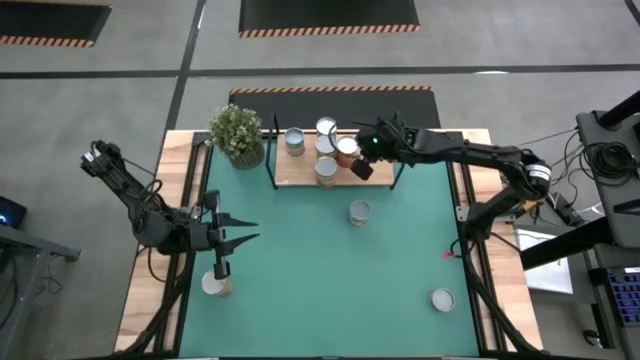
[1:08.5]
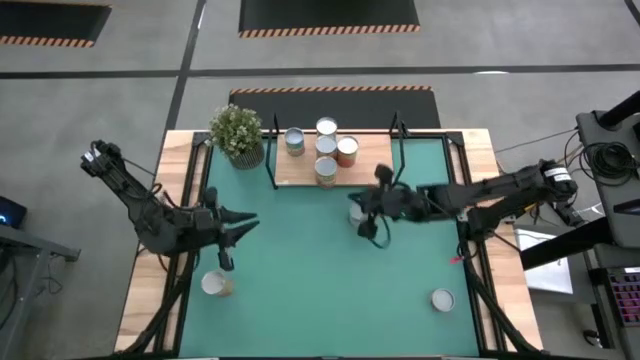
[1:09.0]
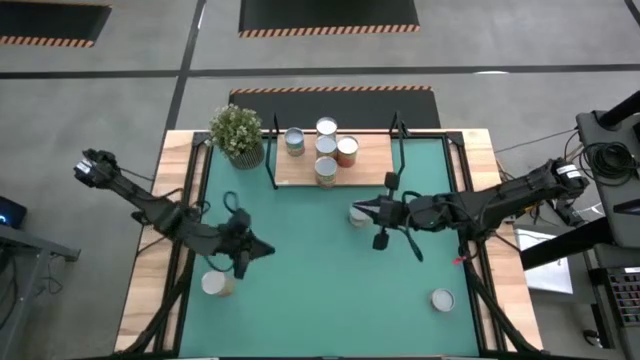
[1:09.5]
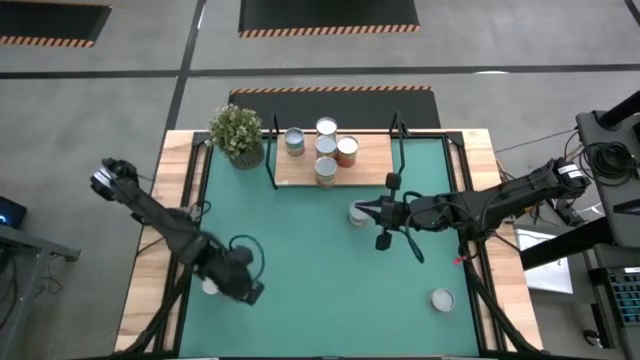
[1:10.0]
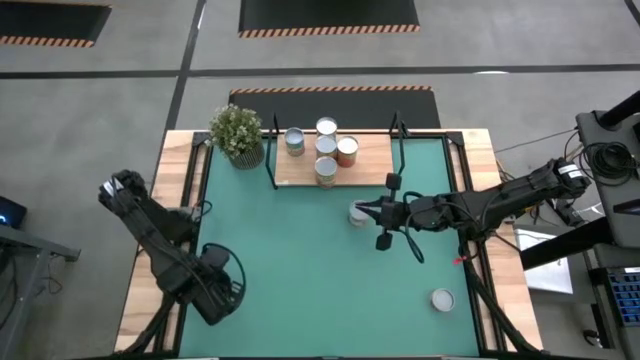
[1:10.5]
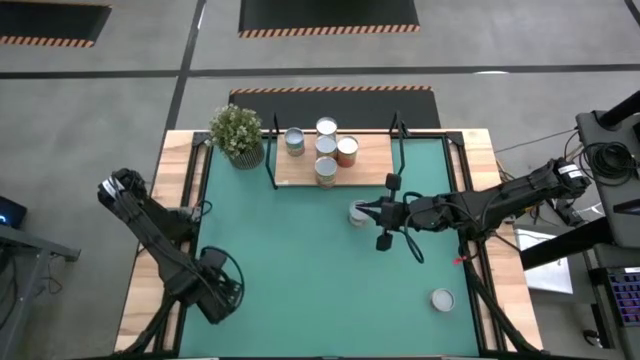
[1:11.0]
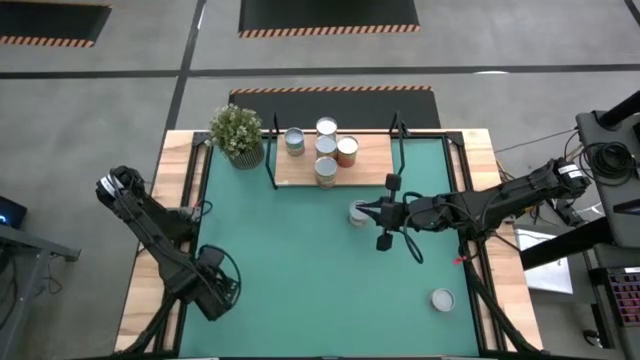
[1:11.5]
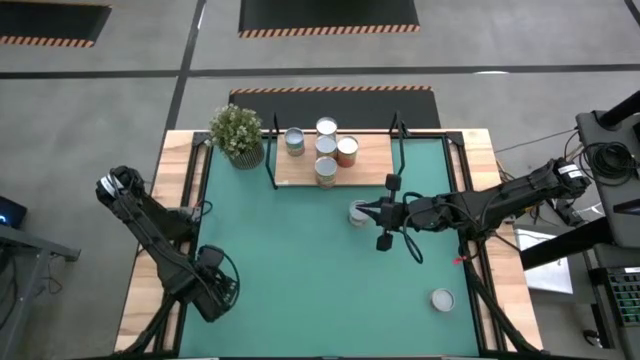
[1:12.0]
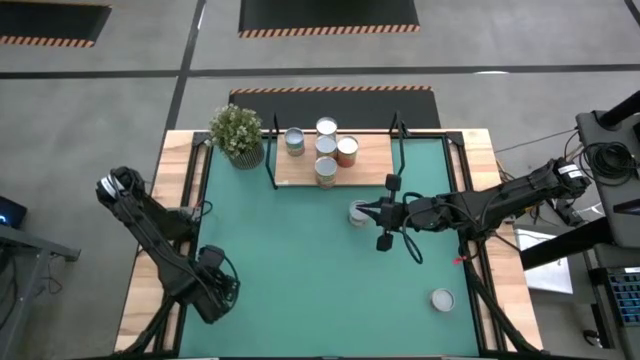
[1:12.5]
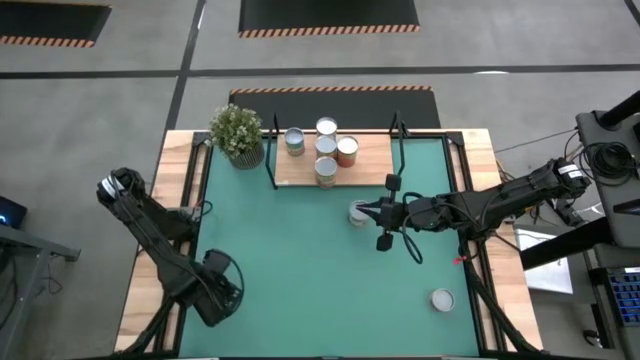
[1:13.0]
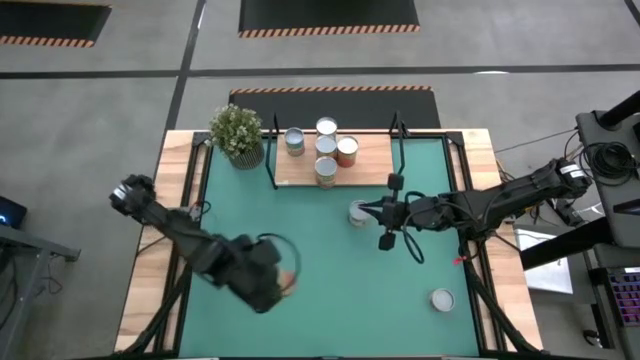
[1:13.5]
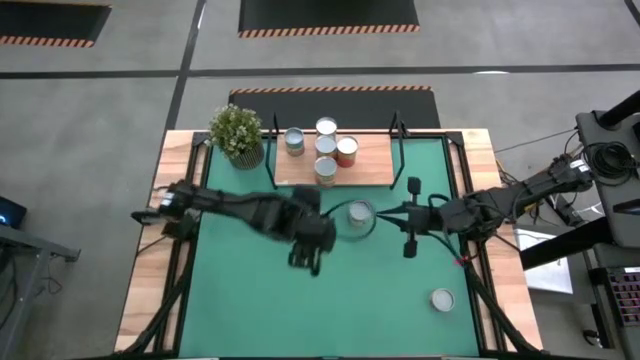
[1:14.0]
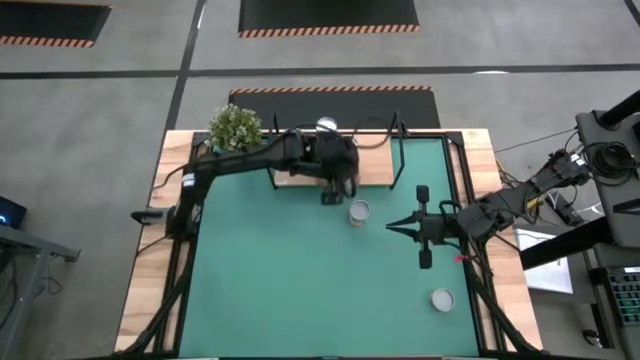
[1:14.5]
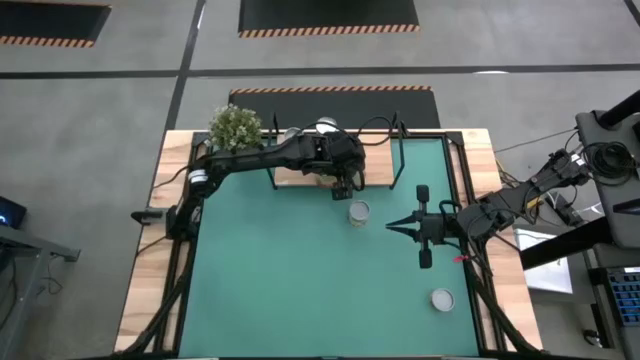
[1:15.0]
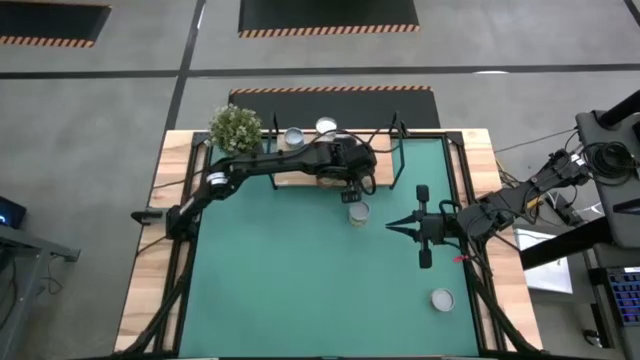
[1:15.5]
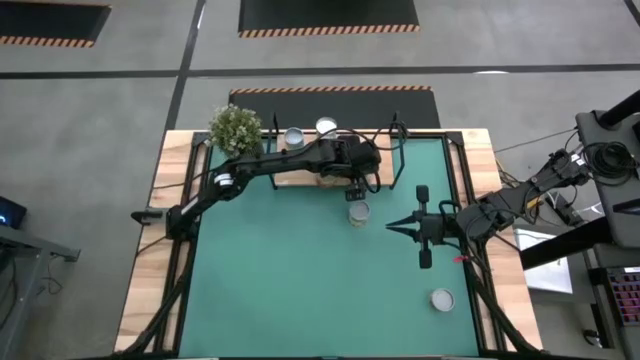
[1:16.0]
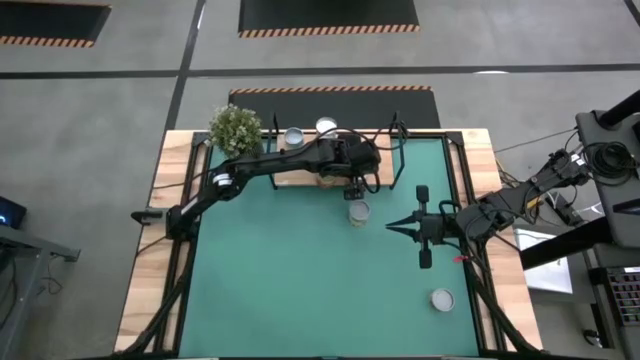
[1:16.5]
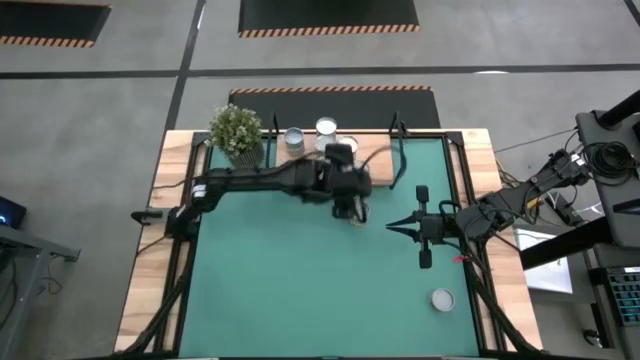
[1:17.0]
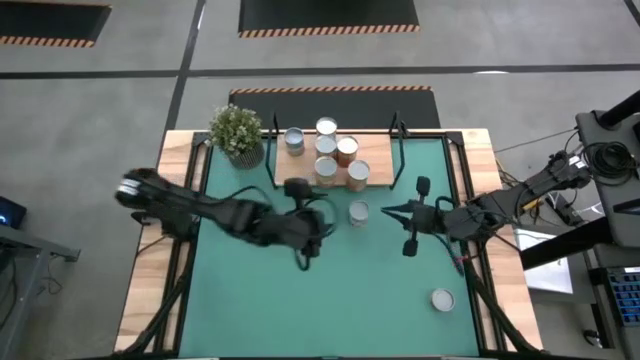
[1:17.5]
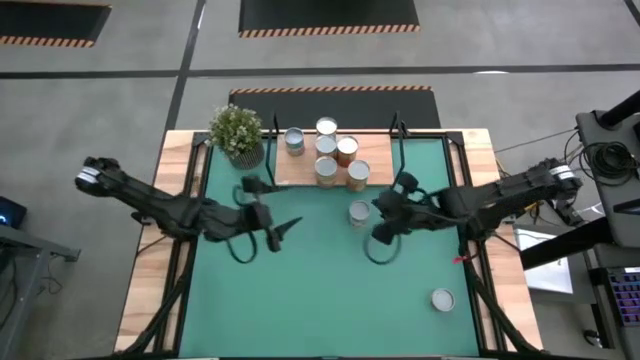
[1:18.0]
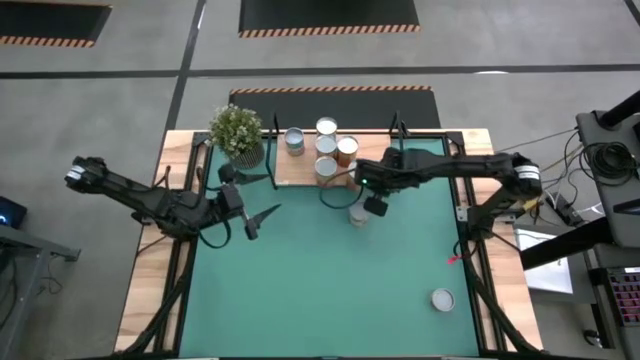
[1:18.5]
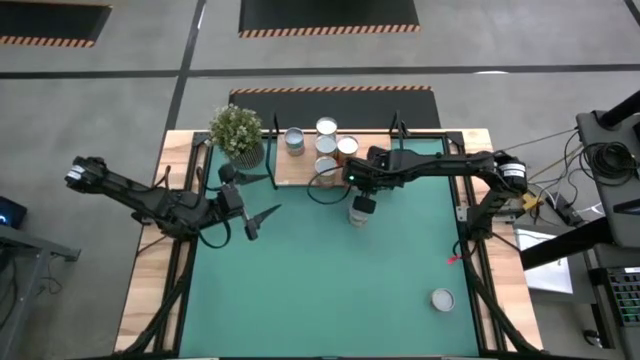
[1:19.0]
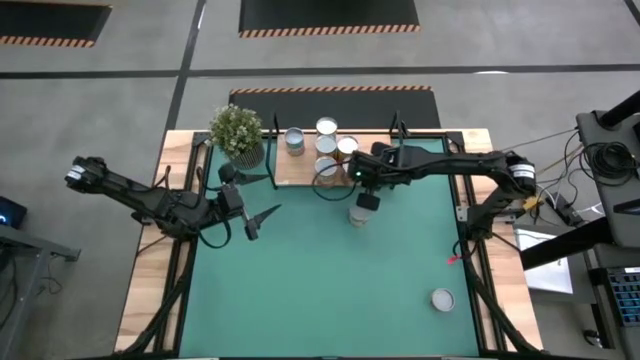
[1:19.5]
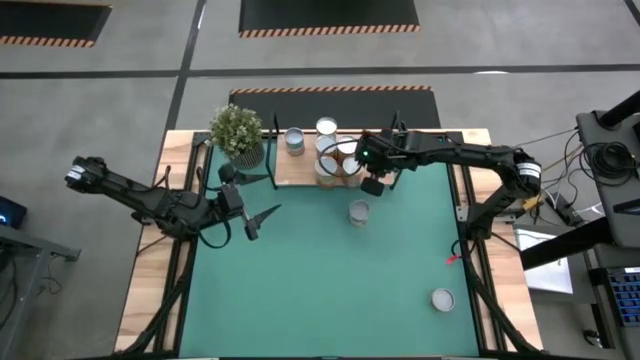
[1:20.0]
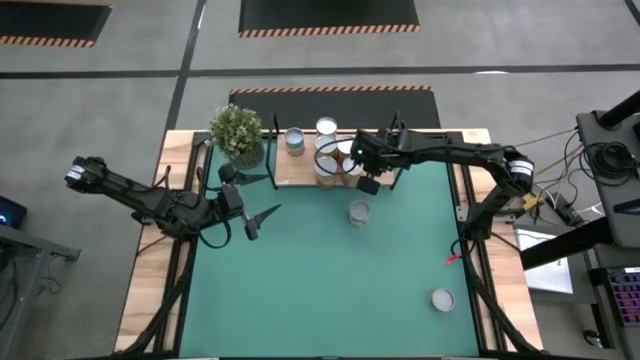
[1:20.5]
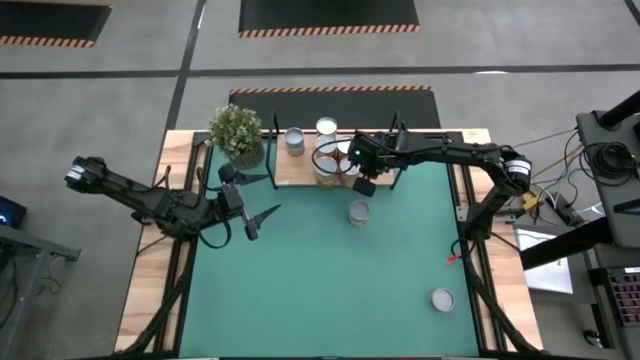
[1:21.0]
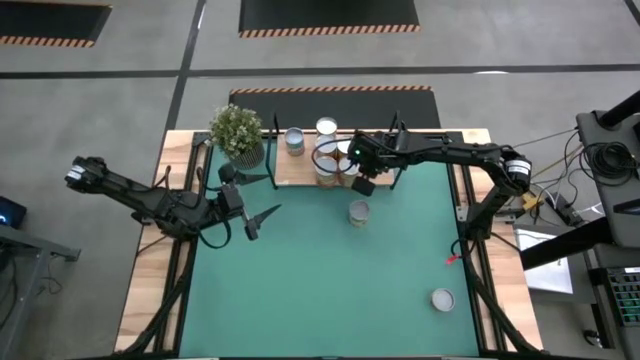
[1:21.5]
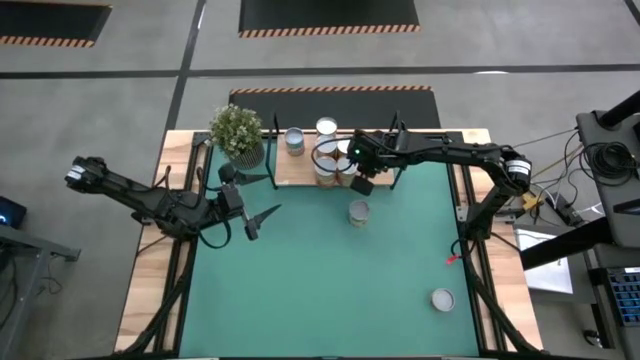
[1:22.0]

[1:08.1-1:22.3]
Task: Pick and place cans onto a shelf
Put the canned pineapple on the shelf

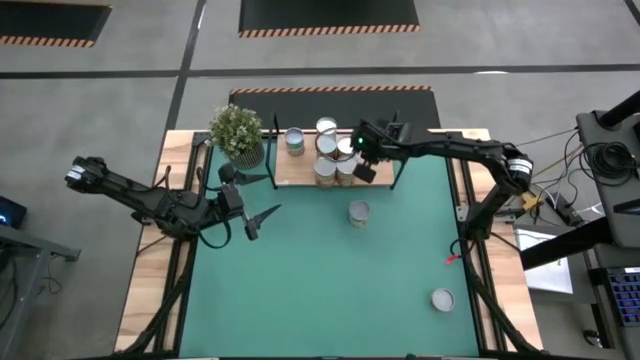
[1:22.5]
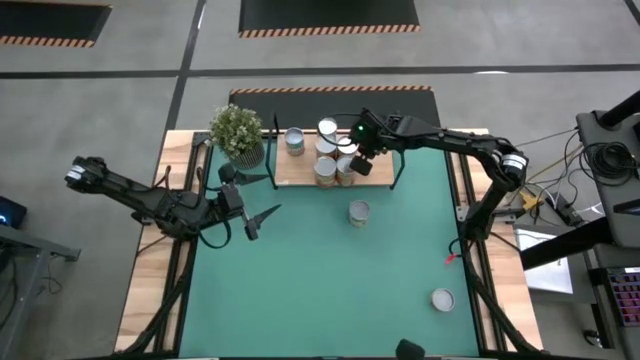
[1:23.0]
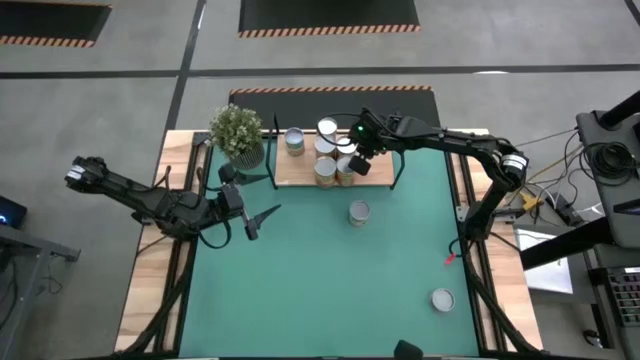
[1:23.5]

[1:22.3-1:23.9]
Adjust the canned green beans on the shelf

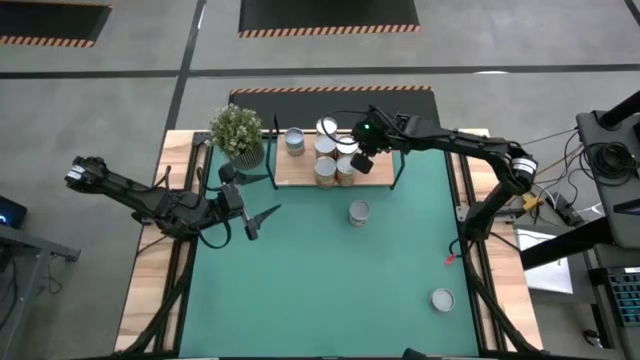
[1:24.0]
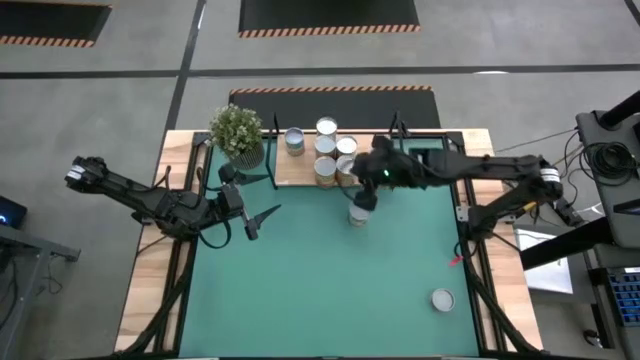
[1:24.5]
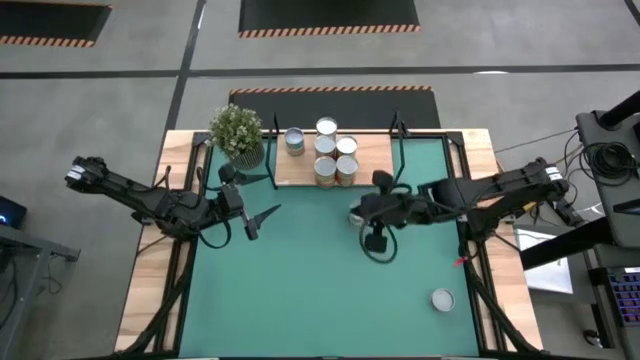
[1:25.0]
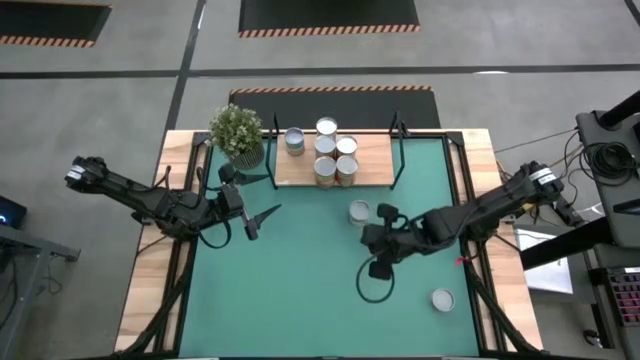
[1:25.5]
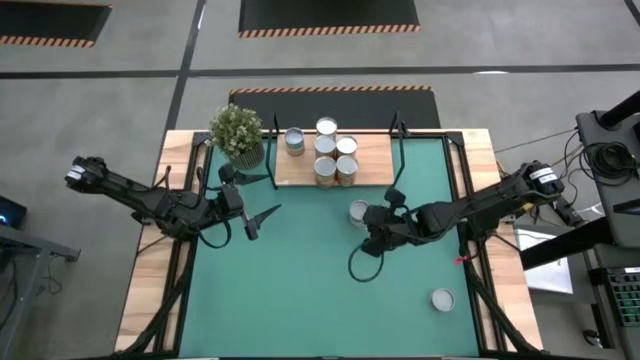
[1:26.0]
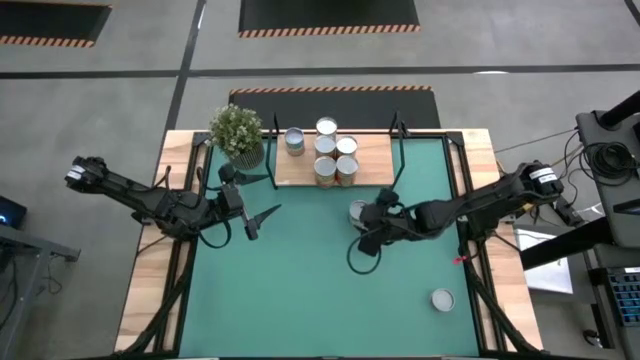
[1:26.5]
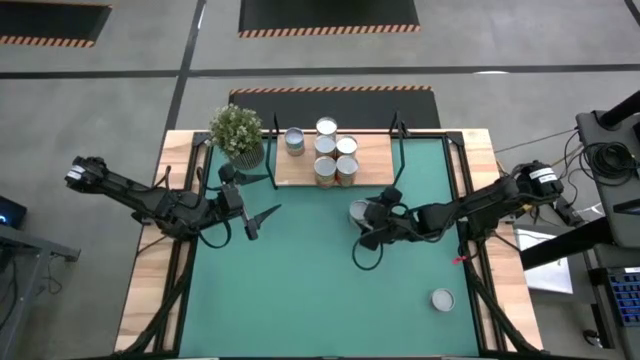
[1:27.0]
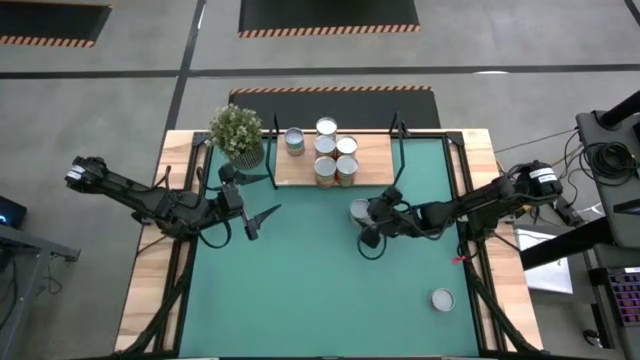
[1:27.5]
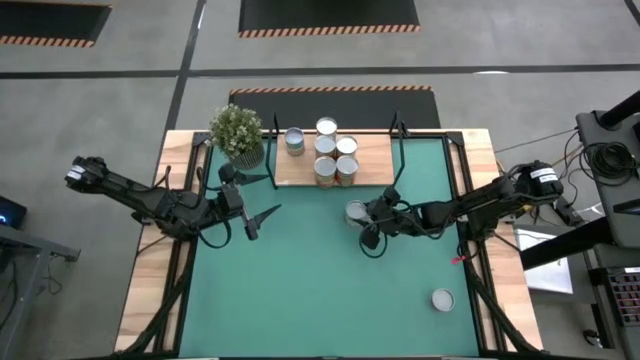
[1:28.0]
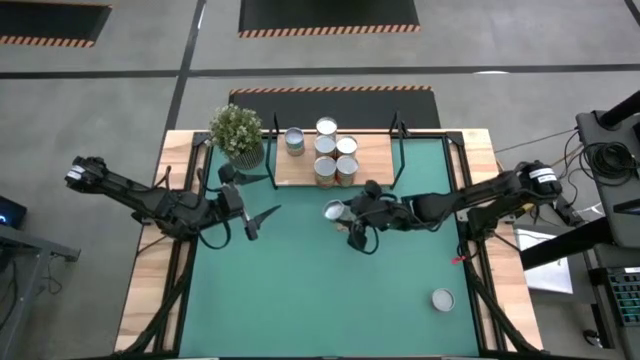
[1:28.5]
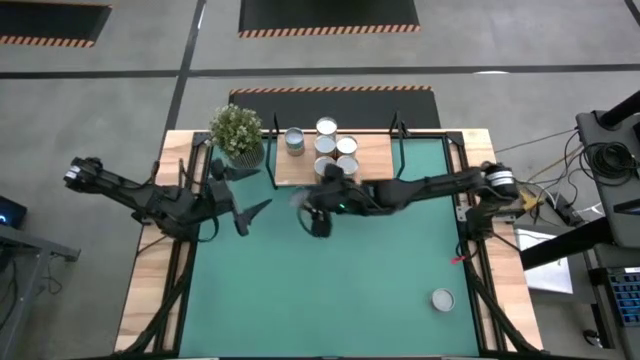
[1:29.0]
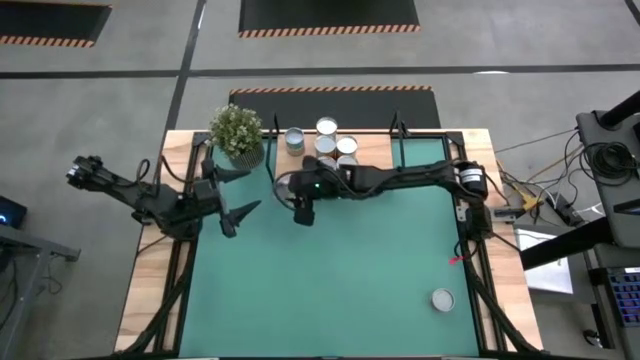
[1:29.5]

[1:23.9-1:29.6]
Put the canned spaghetti sauce on the shelf

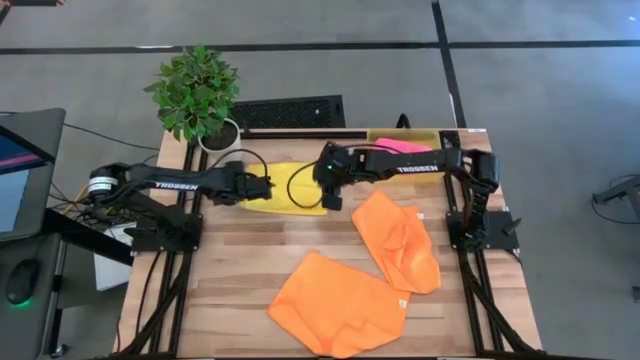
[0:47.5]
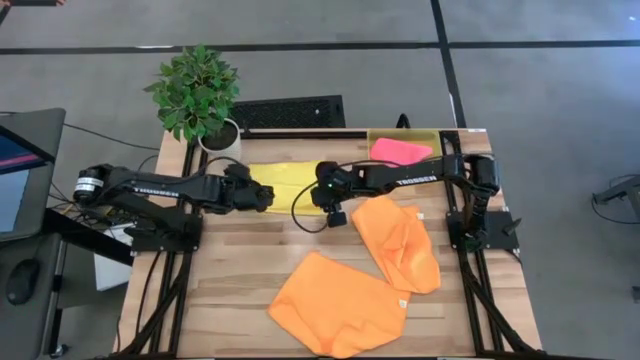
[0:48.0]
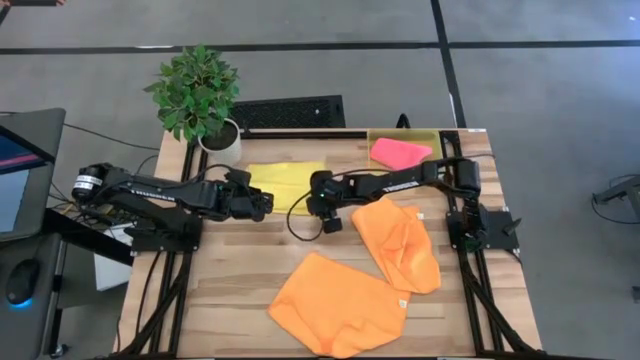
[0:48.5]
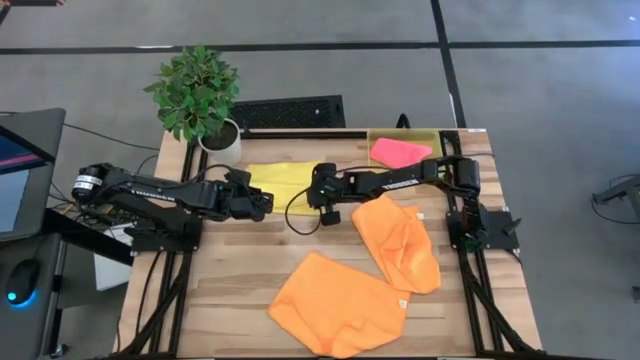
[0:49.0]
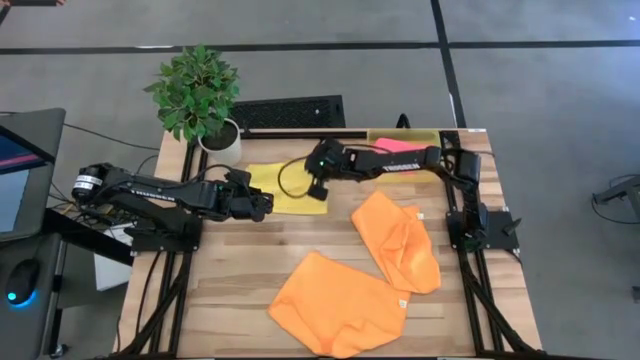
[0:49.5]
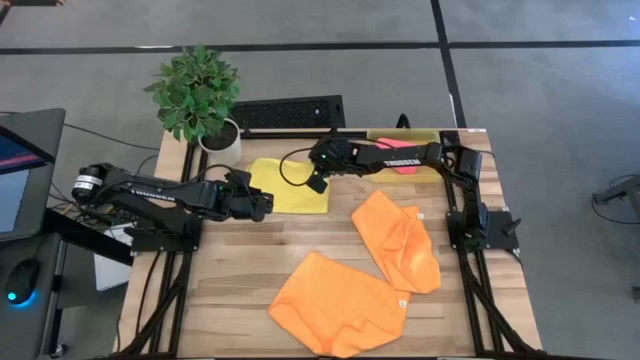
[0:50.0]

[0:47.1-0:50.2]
Task: Fold microfiber towels
Fold the yellow microfiber towel
